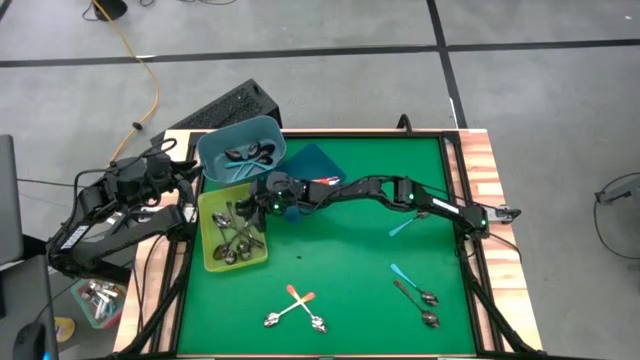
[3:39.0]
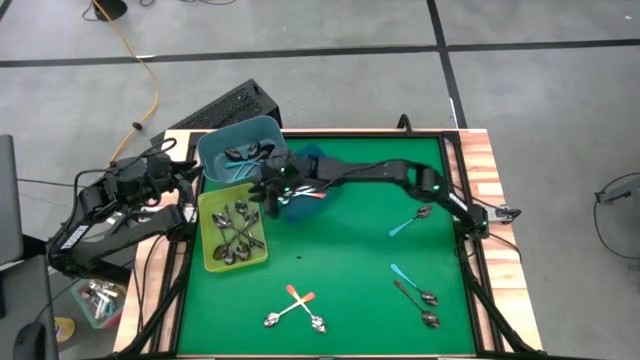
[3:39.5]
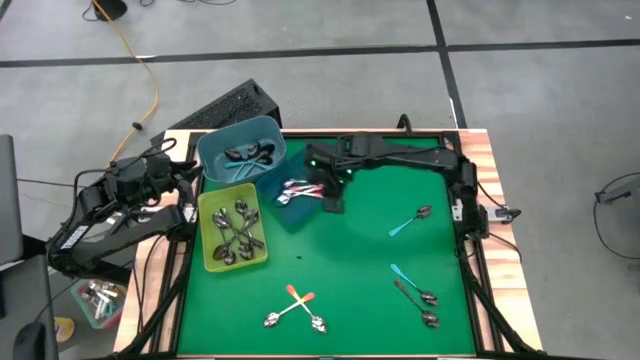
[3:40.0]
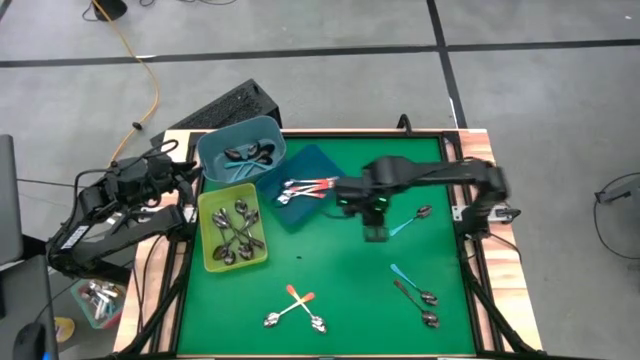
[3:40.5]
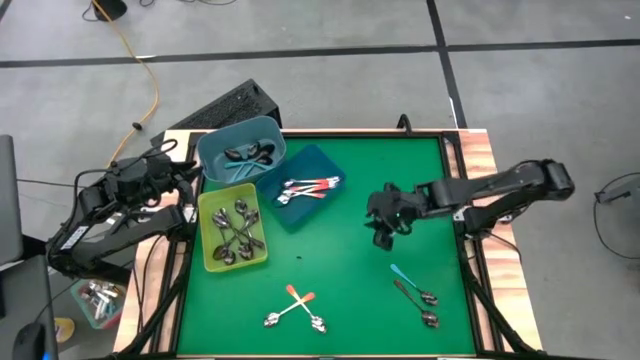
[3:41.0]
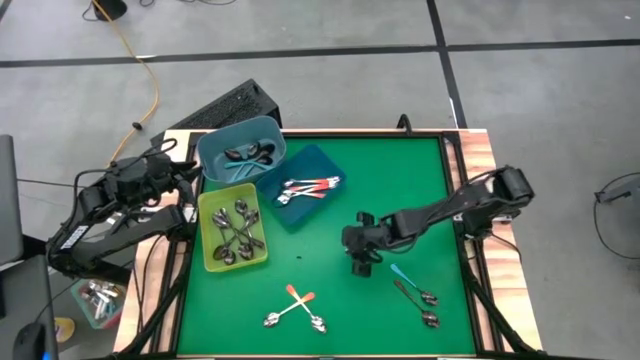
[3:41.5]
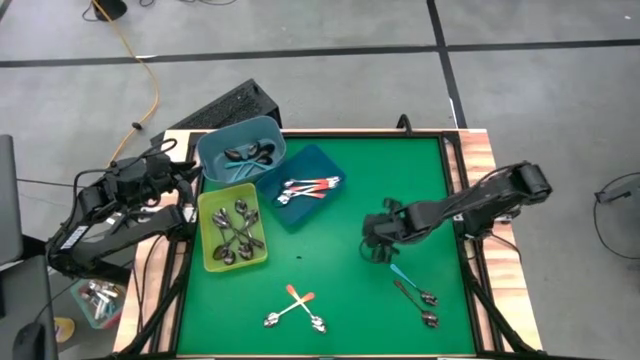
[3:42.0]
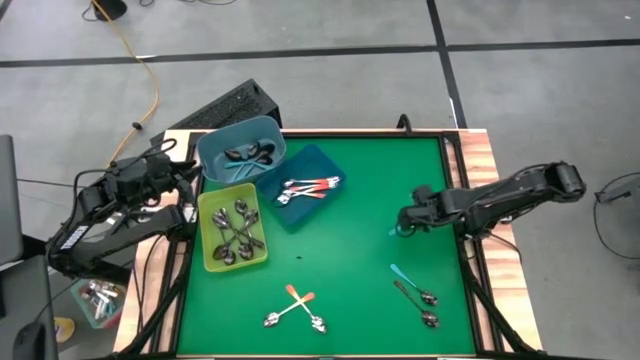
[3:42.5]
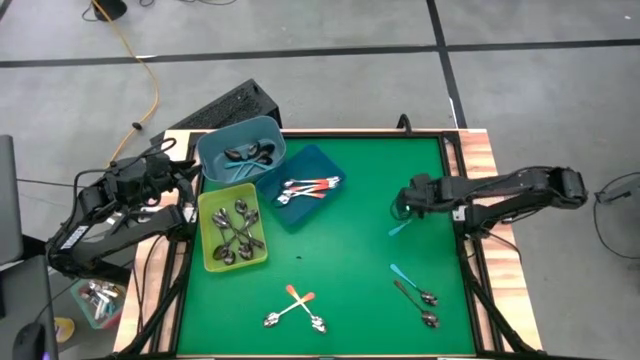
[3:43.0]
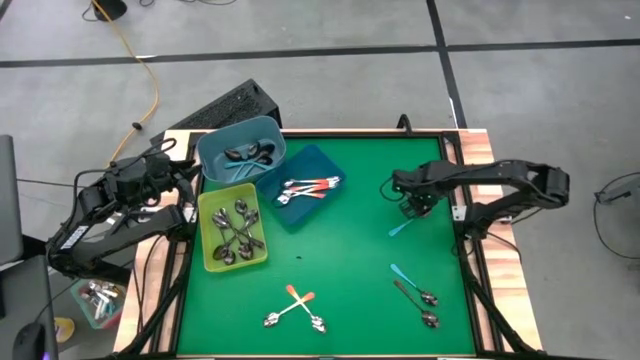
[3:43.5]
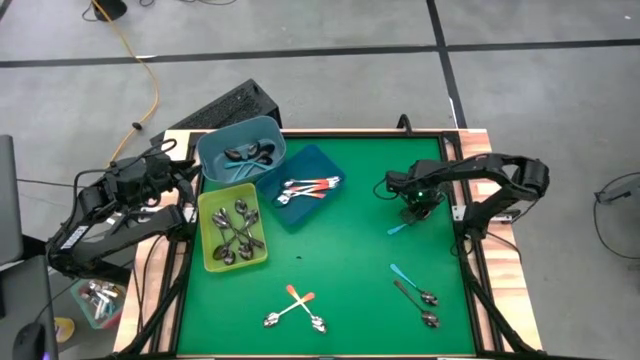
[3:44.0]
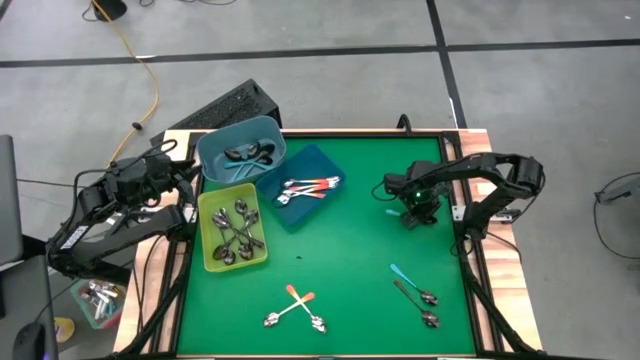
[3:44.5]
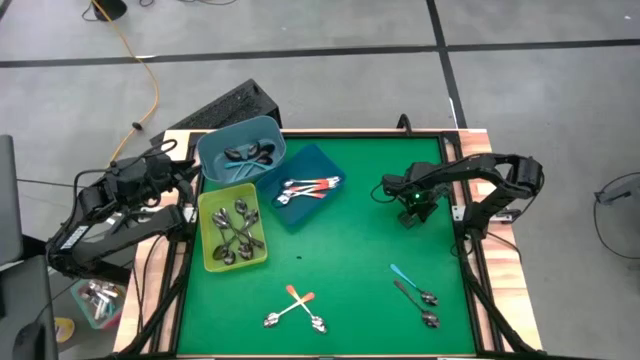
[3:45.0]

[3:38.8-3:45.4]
Task: Sort silverware by color (type)
Put the blue spoon into the light blue bin

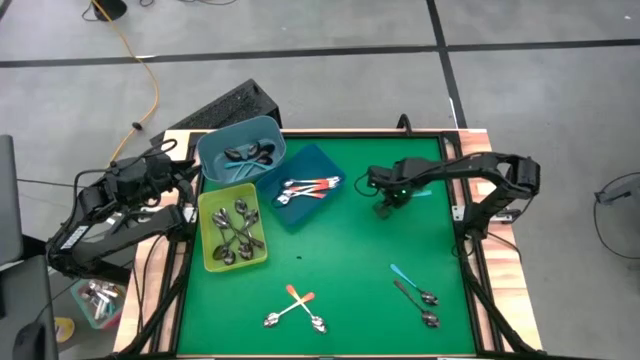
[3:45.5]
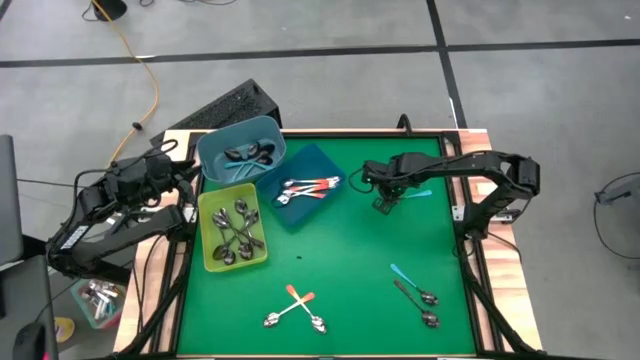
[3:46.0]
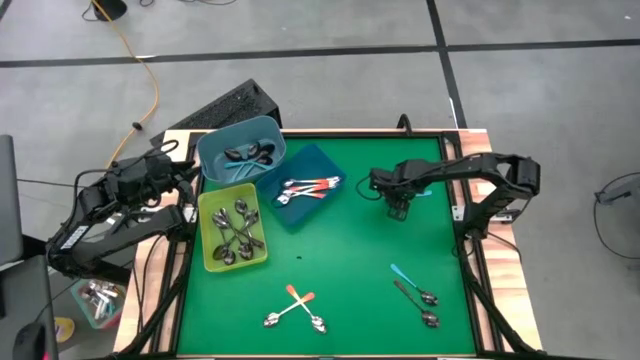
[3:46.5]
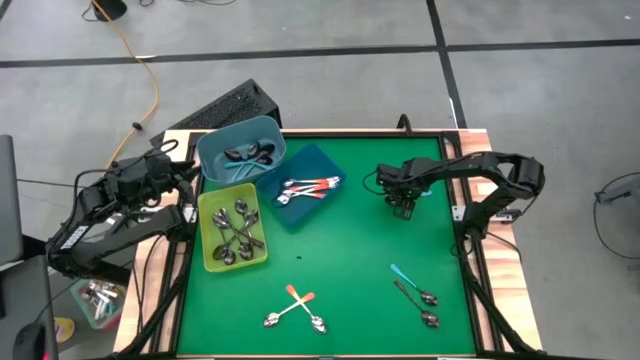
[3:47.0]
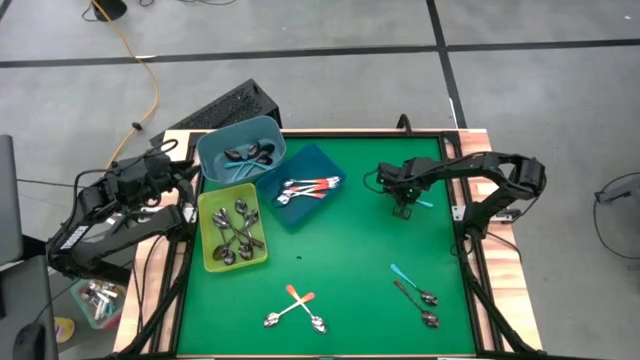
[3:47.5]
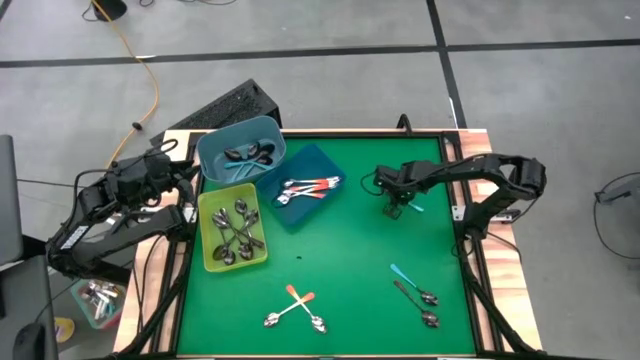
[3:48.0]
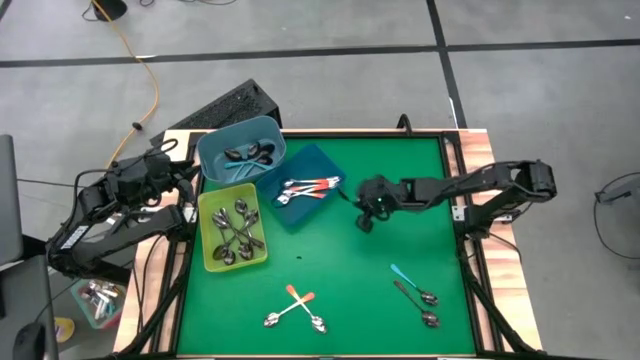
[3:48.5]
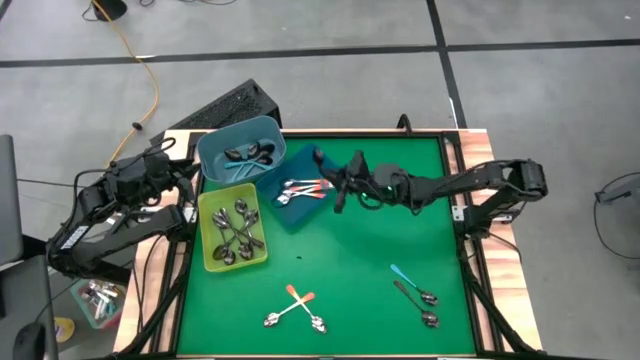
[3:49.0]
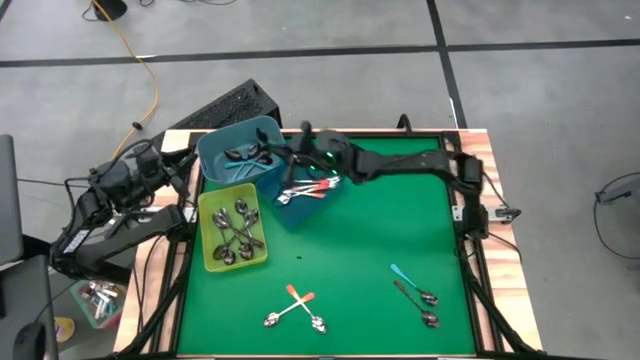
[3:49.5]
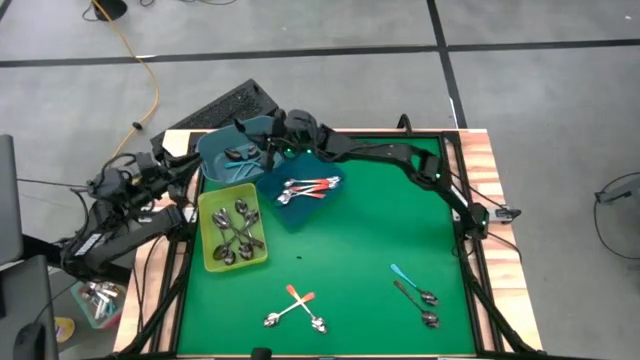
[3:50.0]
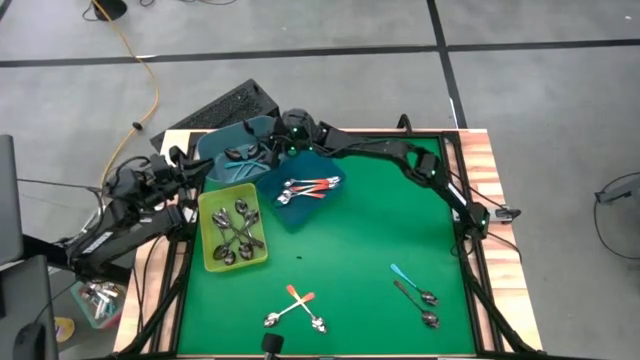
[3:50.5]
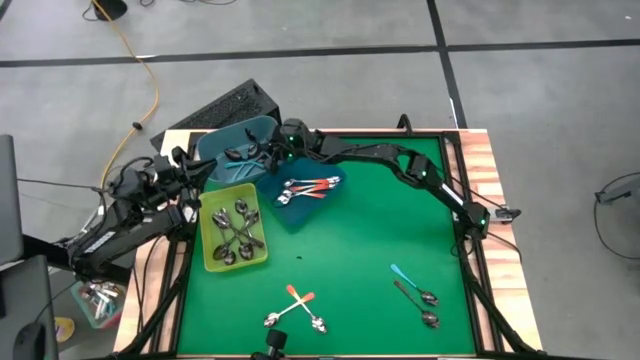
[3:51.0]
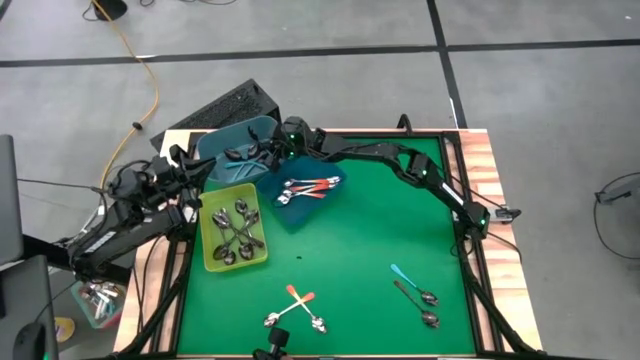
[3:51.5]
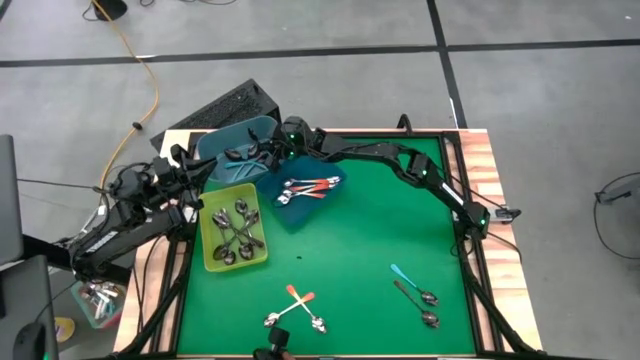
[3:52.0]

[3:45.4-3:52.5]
Put the blue spoon into the light blue bin

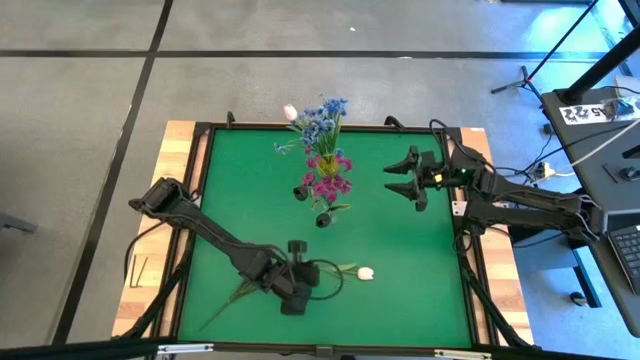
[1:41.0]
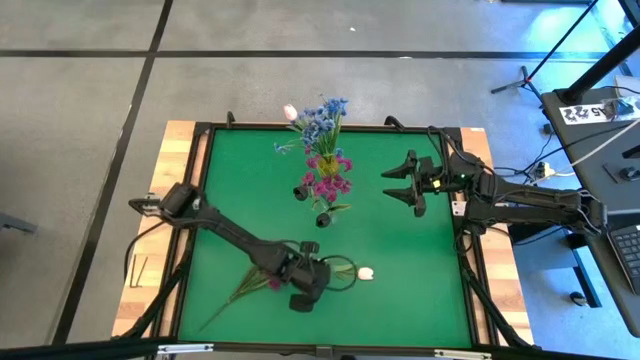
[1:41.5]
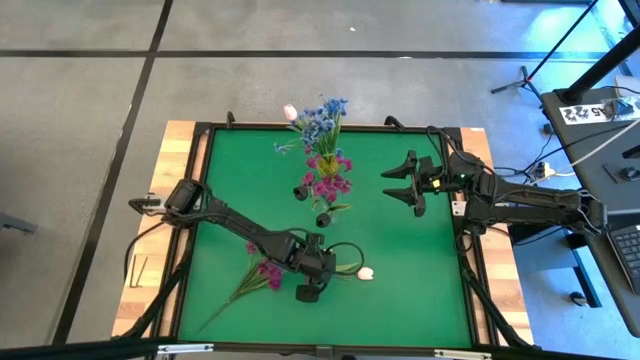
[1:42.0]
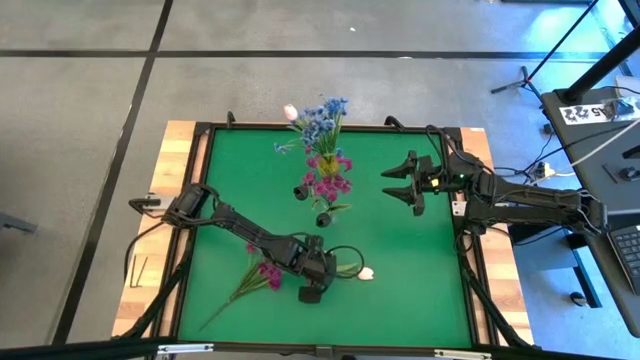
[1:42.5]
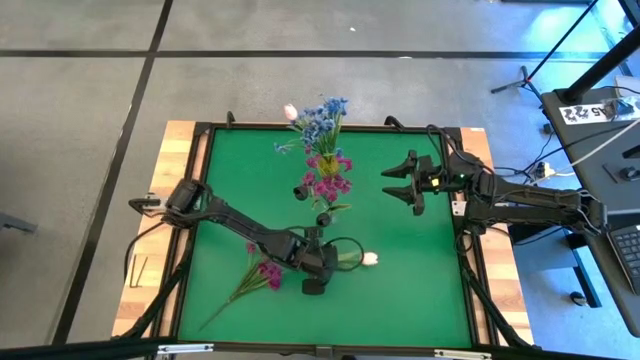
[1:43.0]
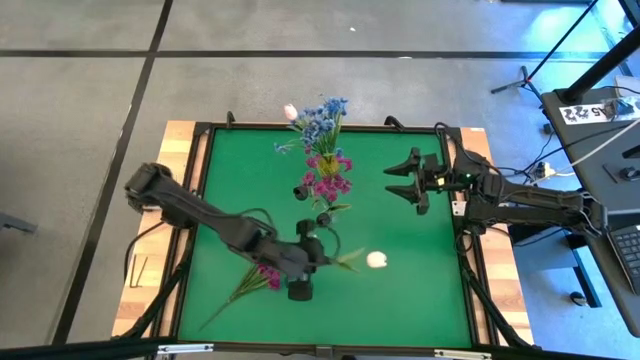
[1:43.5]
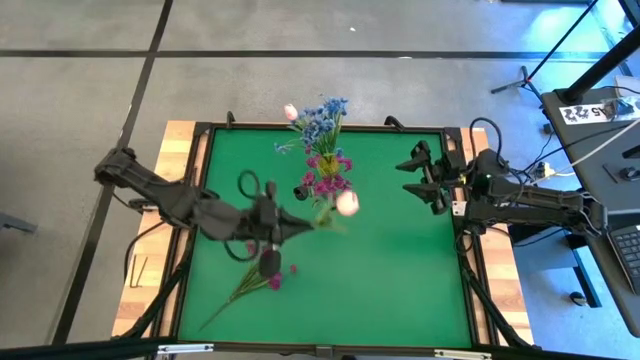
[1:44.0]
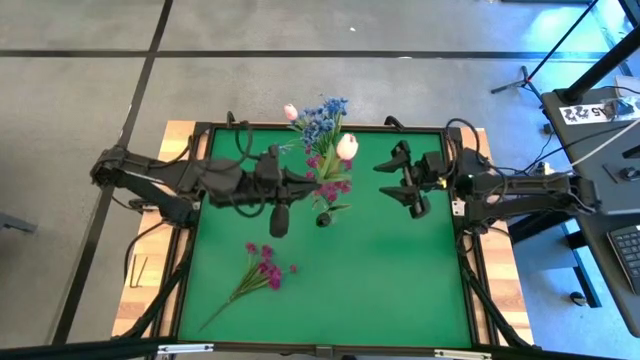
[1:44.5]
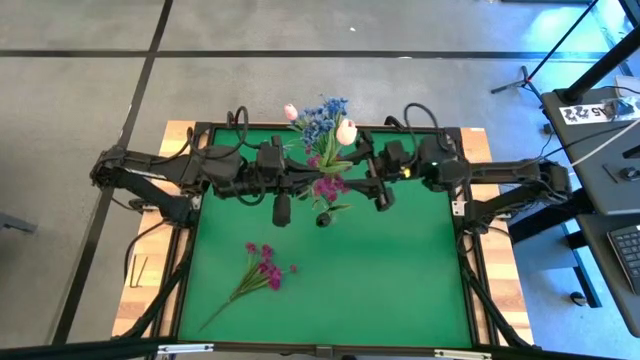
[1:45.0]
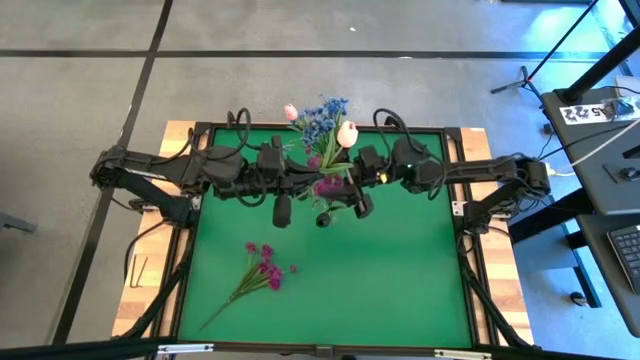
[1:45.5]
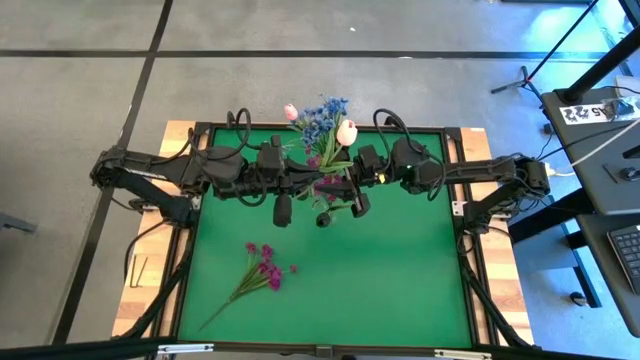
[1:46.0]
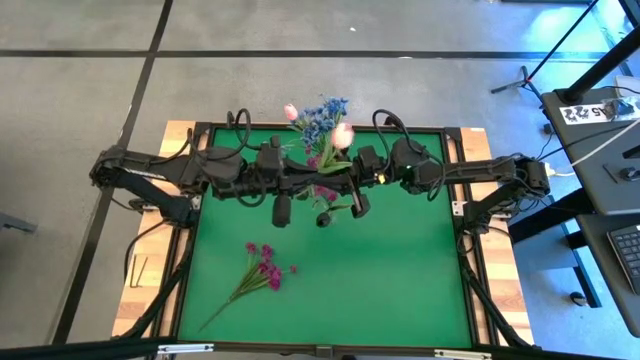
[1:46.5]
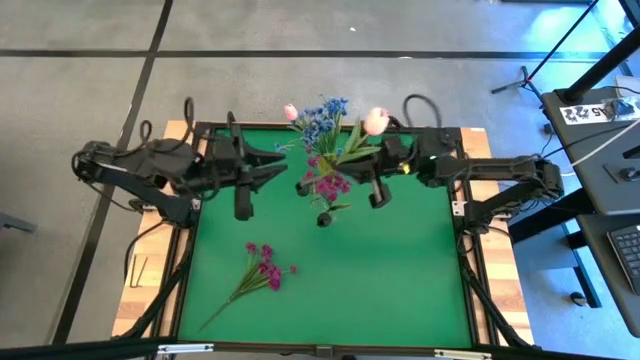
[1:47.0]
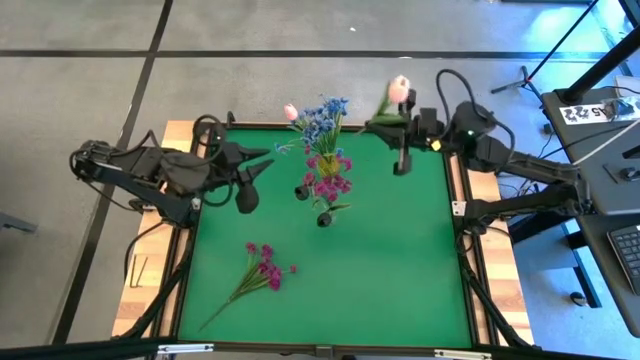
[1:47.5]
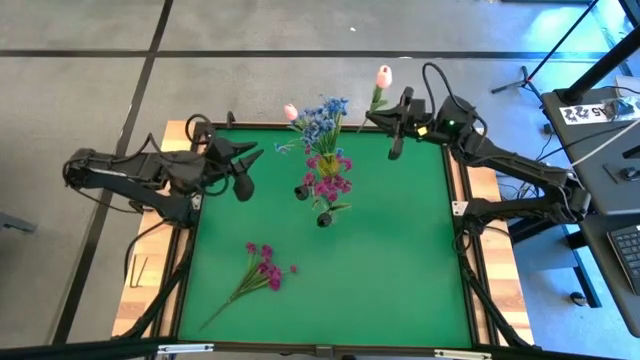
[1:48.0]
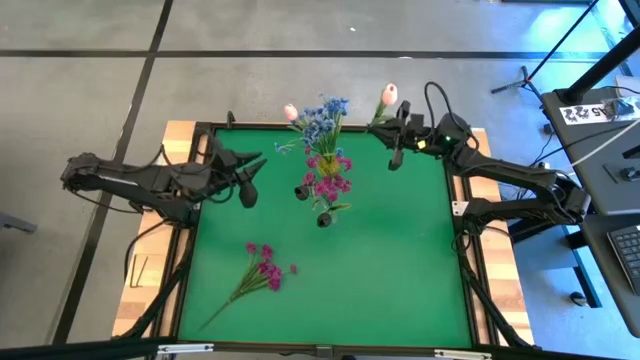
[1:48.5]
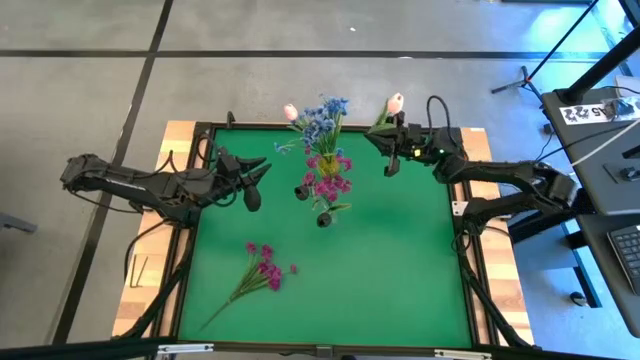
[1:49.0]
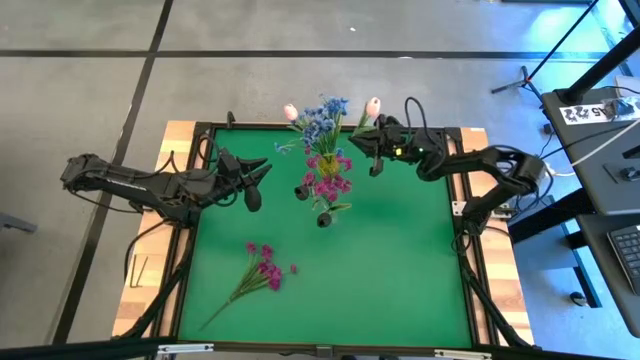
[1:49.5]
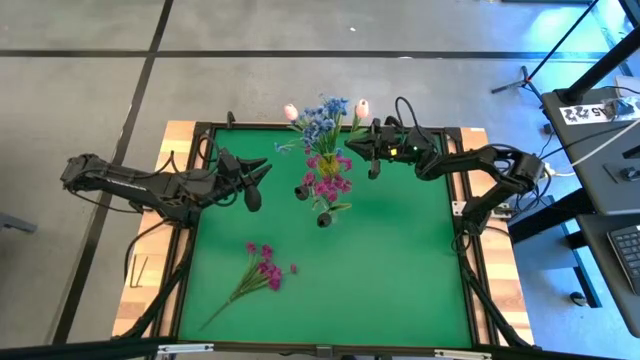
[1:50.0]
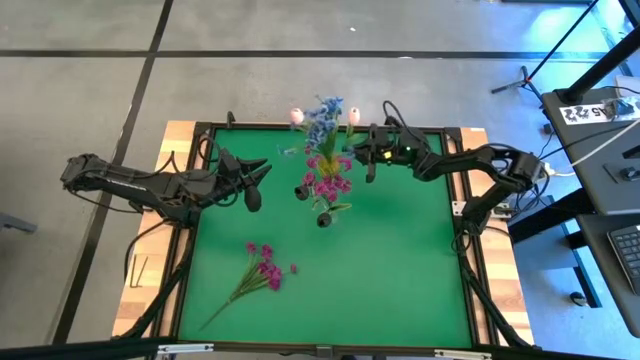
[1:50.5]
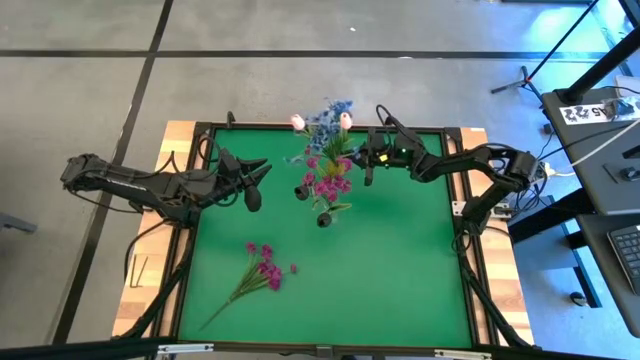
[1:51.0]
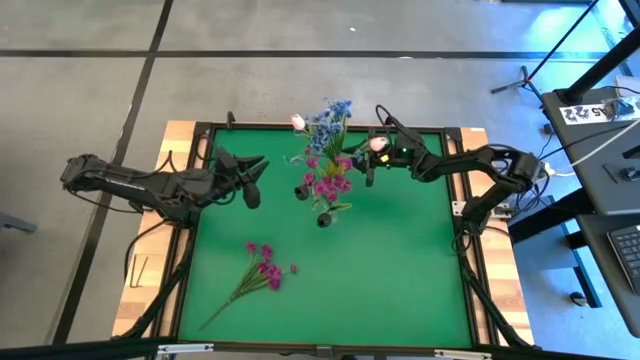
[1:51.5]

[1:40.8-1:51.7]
Task: Sort flowers into vase by color
Put the pink tulip into the yellow vase
